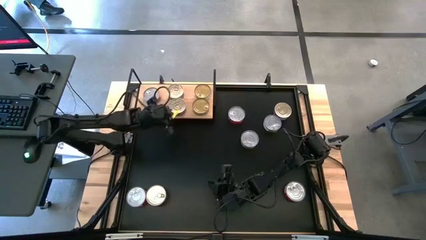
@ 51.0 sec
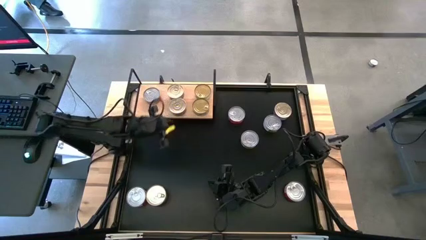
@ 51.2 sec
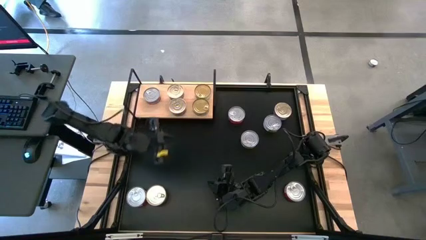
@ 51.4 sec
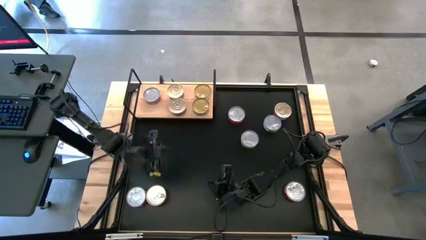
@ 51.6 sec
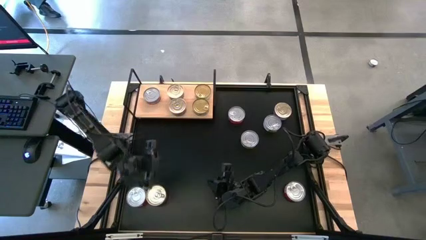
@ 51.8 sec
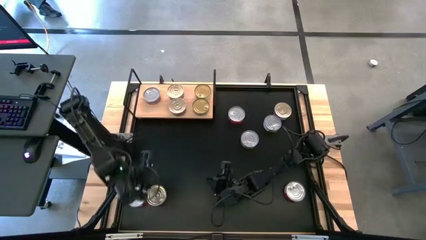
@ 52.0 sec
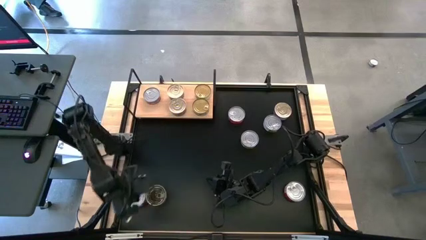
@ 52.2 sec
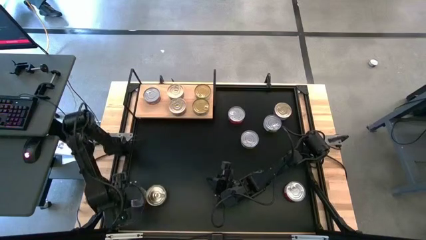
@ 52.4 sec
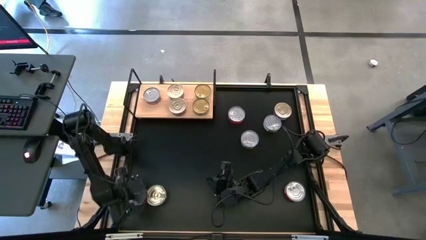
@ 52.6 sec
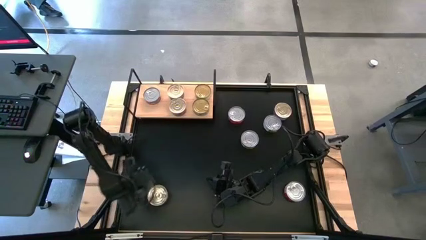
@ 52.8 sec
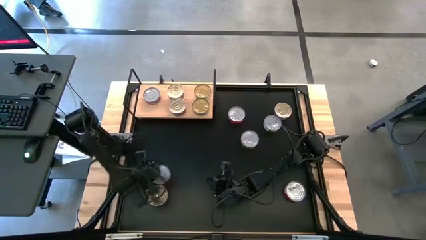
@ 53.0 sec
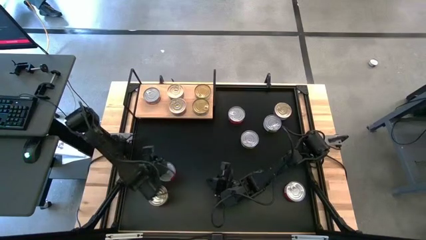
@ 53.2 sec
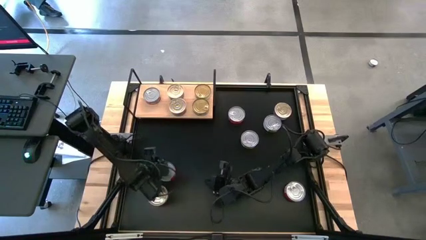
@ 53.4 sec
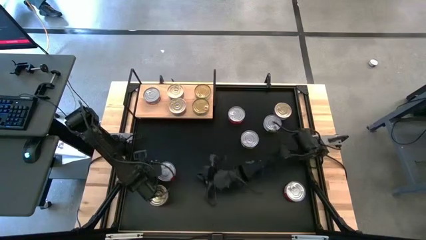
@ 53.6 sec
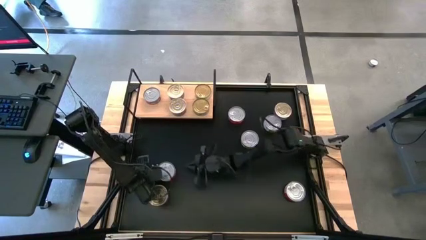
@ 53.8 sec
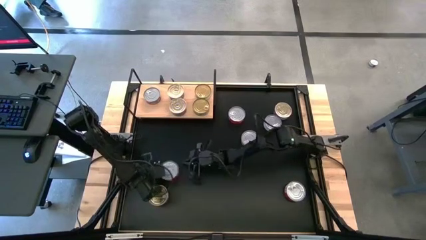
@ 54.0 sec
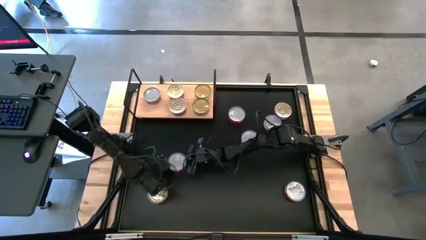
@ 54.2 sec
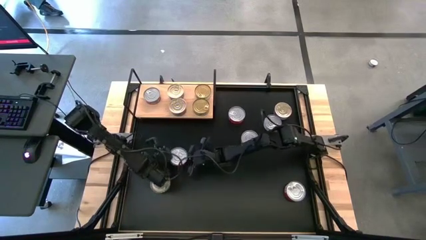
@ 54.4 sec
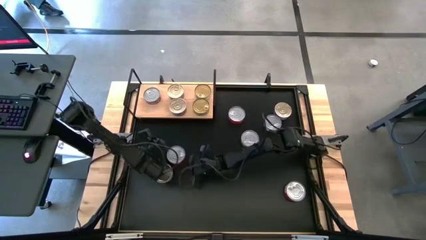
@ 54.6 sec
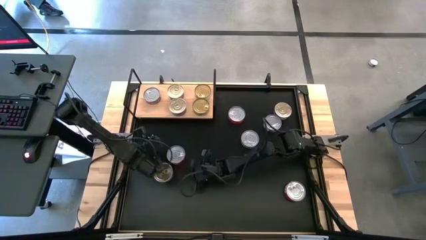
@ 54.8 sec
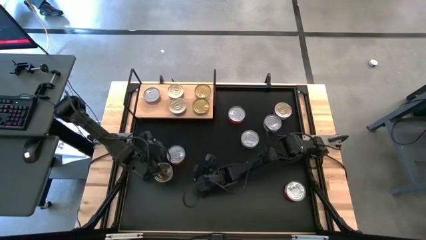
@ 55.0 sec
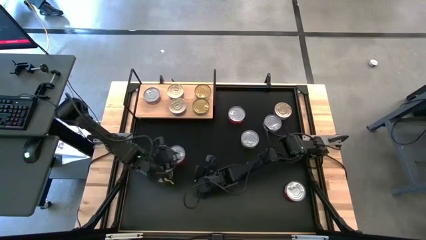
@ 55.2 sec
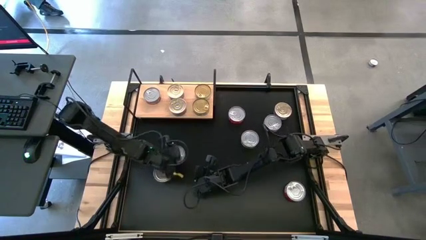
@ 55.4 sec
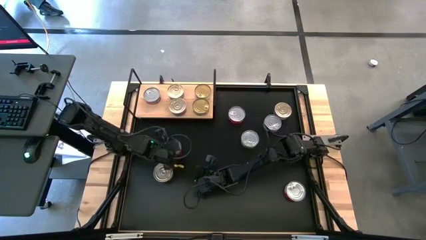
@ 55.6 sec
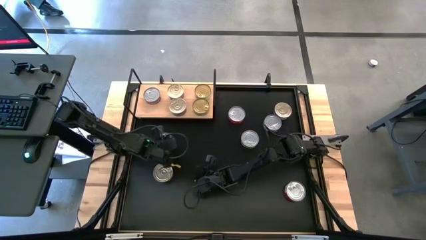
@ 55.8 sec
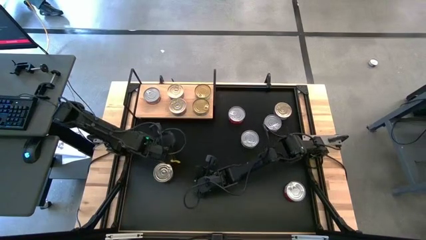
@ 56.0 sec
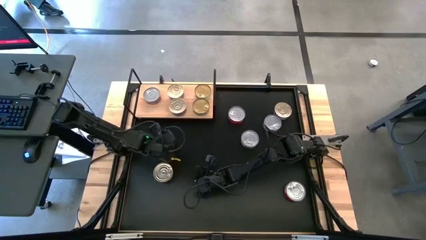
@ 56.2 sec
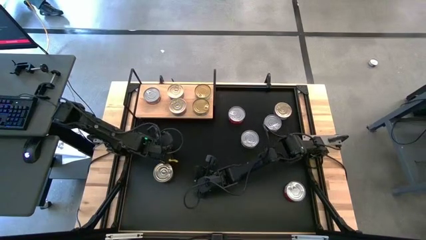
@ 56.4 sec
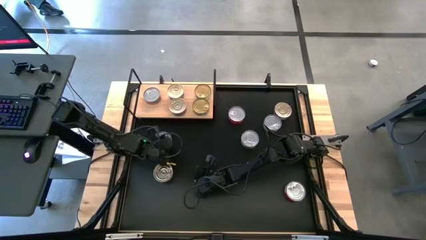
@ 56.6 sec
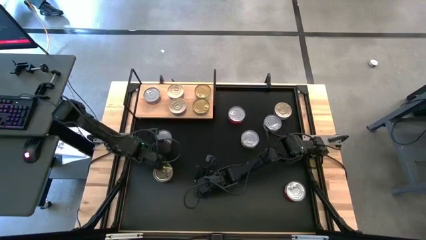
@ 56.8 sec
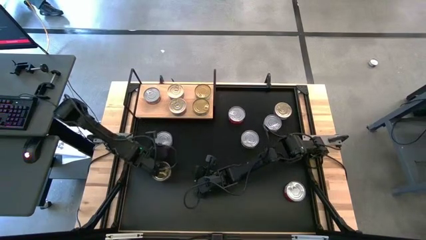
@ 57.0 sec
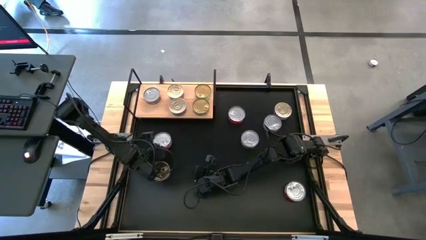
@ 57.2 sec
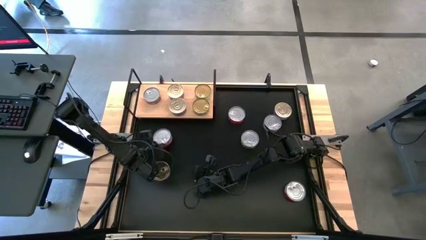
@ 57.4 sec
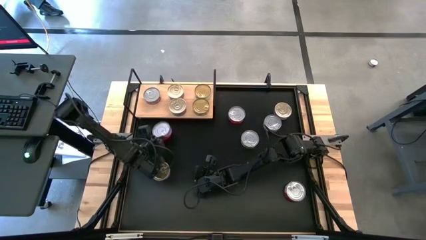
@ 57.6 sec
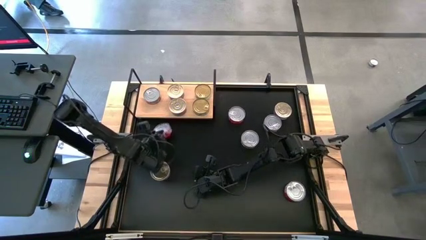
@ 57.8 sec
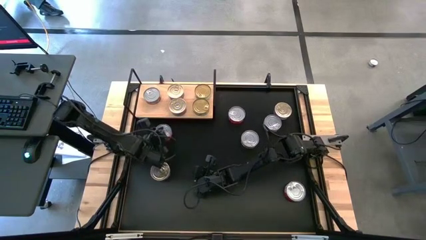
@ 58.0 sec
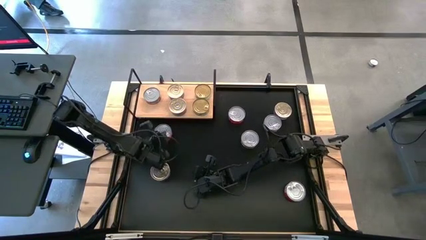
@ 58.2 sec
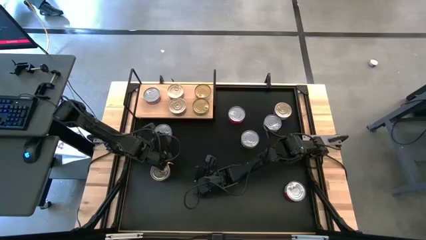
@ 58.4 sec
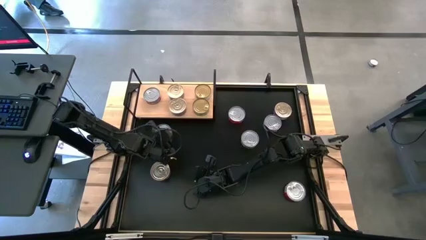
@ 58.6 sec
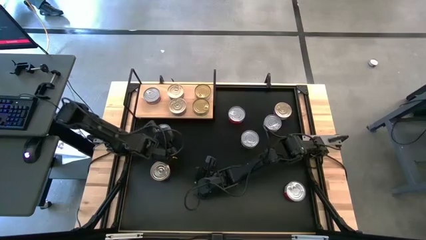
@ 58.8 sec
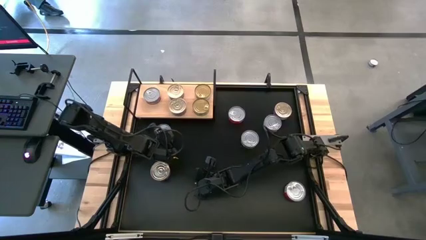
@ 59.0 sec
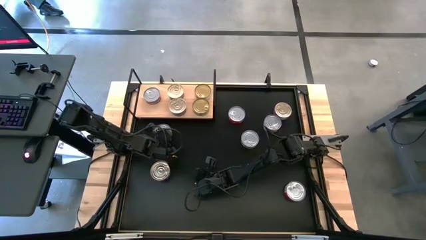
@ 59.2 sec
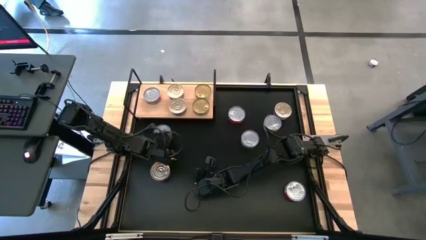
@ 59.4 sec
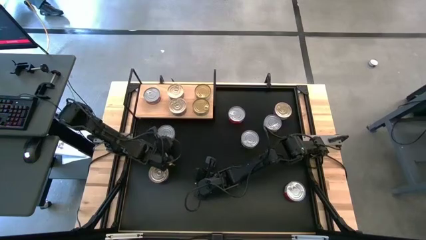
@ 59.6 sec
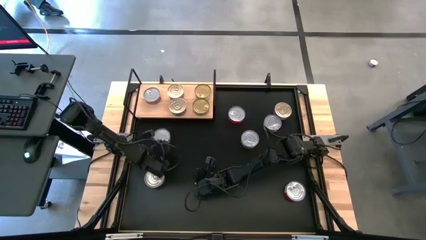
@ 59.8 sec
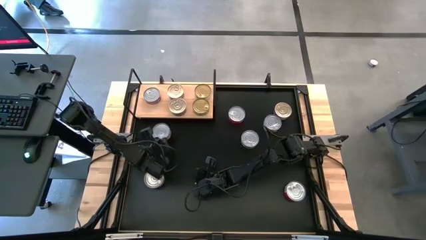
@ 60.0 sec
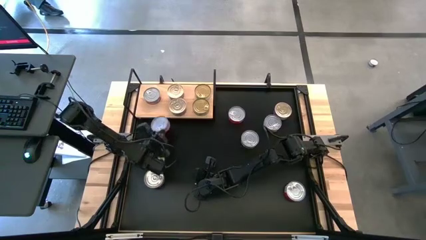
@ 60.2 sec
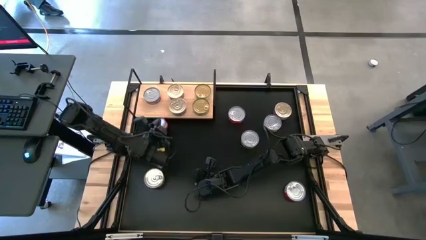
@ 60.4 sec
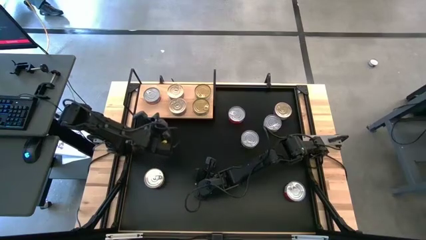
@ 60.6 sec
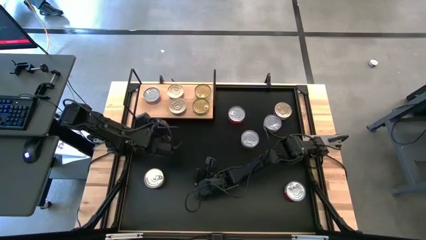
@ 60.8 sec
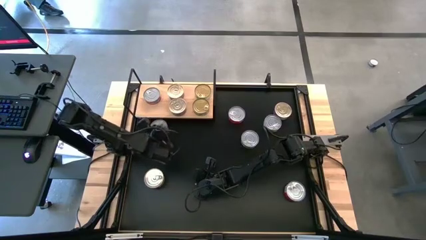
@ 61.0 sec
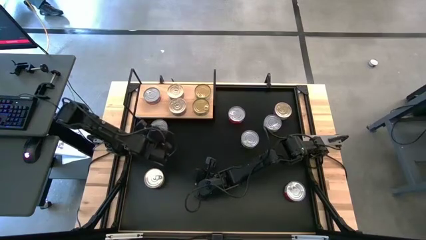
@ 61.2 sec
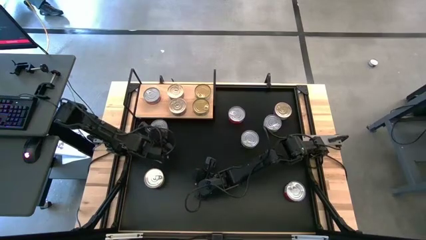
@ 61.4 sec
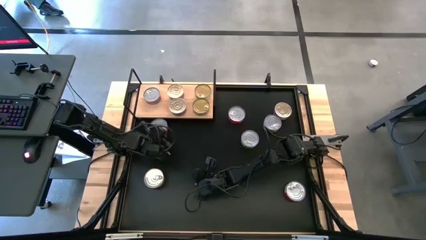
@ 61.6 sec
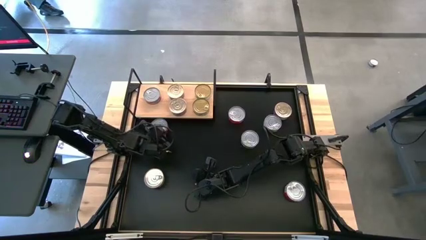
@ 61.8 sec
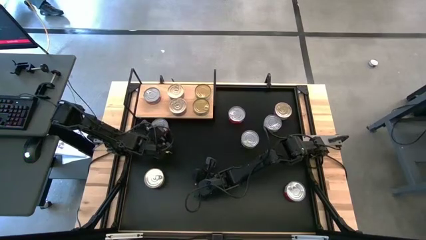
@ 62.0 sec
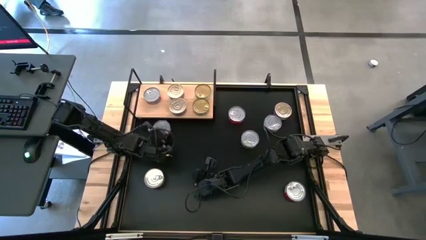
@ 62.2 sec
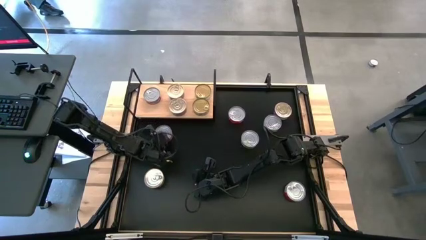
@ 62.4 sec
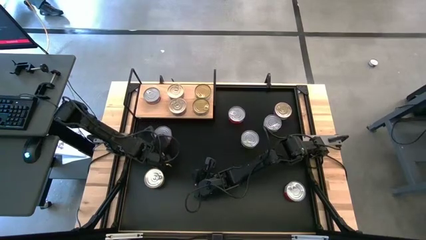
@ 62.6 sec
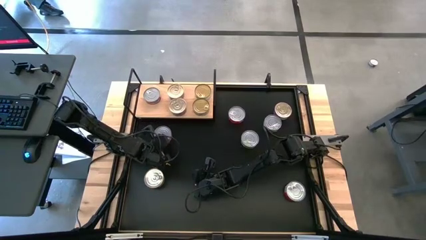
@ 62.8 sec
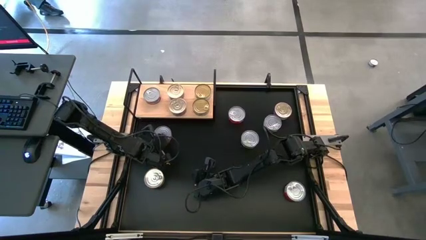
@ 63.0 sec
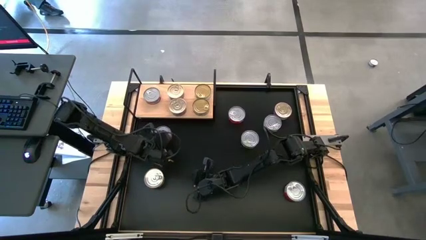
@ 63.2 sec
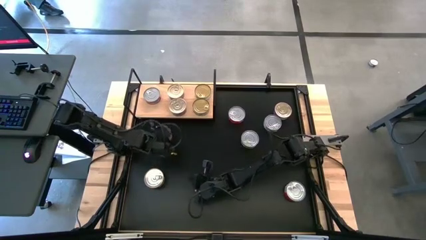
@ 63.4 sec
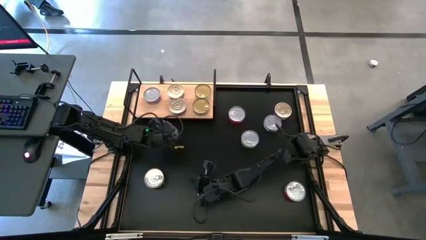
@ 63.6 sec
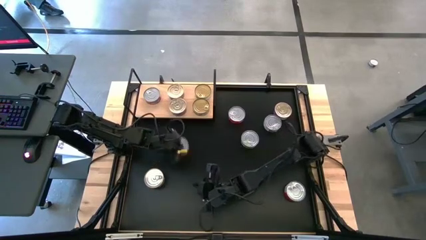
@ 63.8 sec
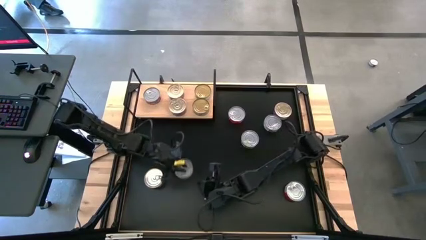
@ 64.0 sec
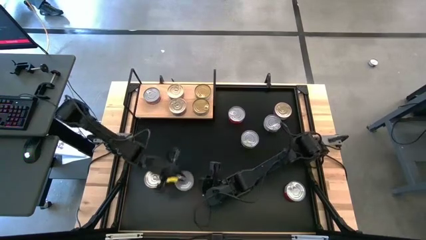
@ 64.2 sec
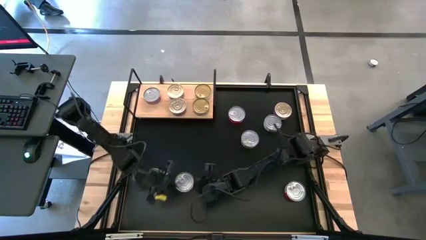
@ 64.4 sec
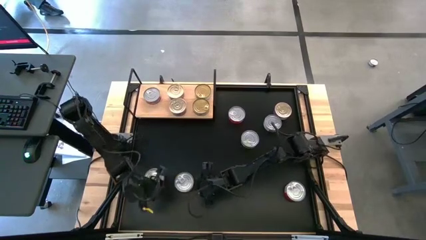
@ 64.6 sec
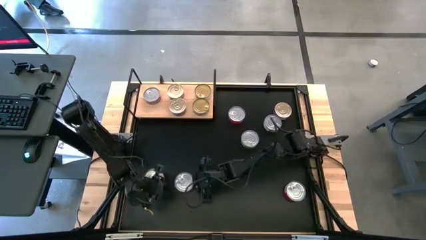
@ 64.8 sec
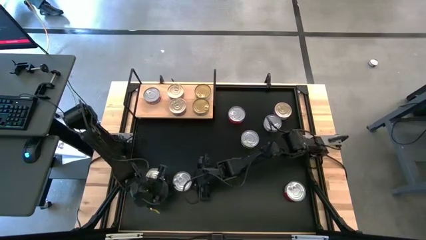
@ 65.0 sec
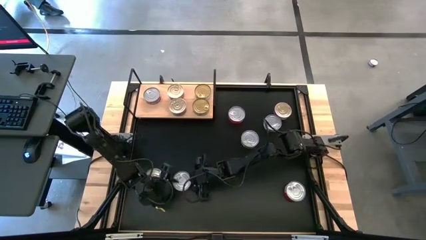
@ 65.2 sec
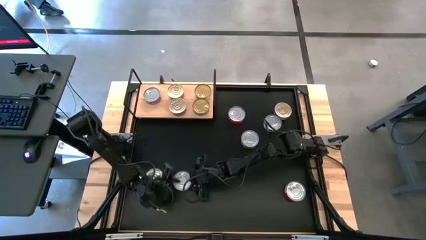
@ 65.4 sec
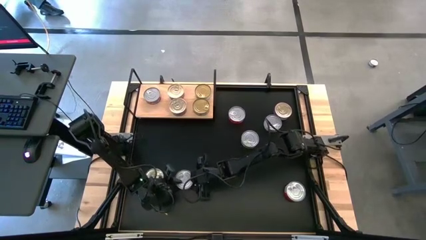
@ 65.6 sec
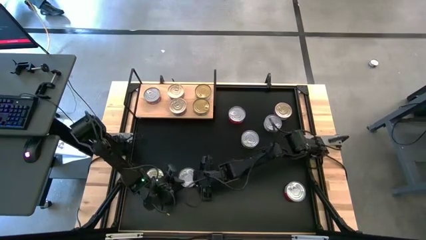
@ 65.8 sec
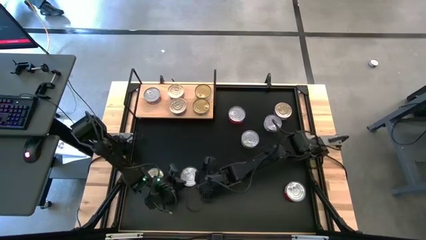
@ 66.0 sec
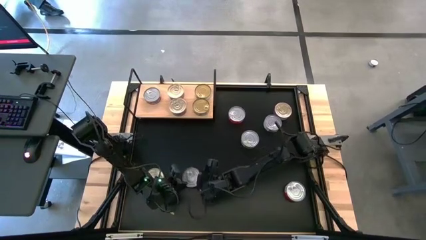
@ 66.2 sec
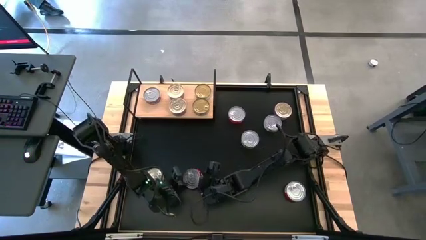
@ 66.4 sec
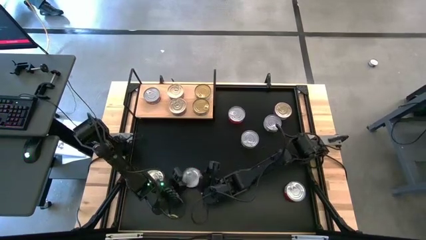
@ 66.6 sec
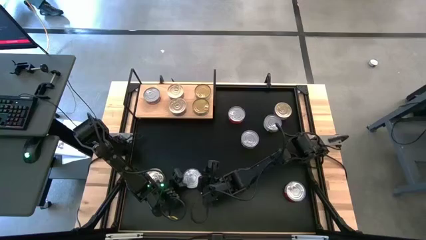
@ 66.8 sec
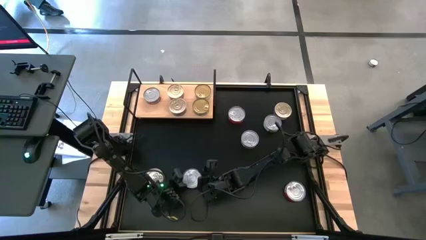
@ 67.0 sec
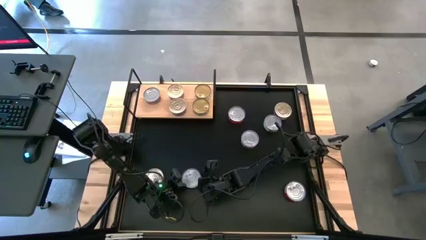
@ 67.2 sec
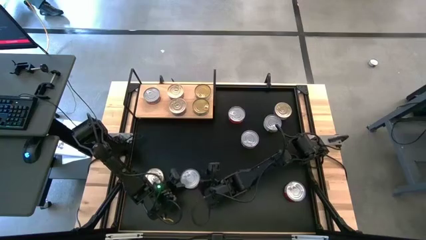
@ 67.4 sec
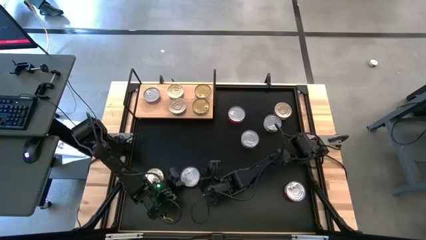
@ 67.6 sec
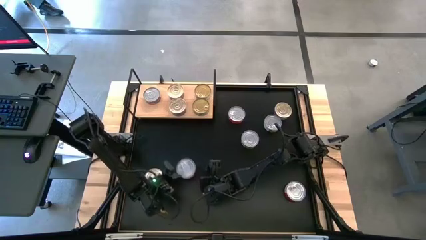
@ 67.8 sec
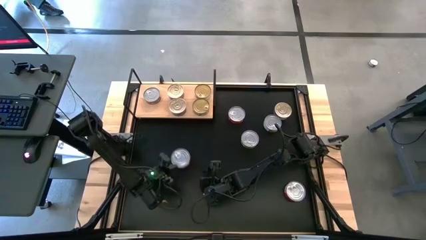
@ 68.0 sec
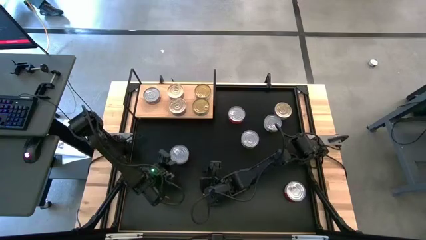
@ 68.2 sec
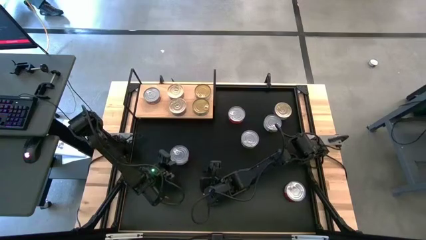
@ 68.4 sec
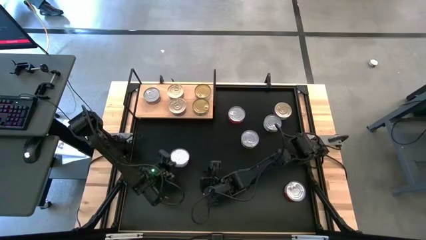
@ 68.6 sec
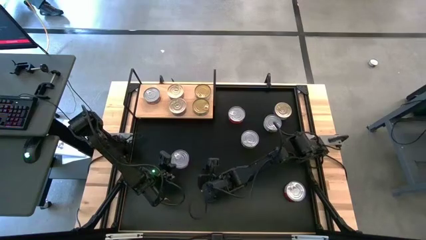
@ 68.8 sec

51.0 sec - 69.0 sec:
Task: Stack canned seafood by type on shelf
Put the red tuna can on the shelf aligned with the other red tuna can
